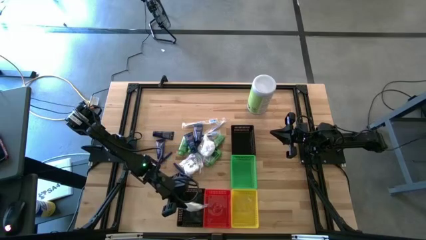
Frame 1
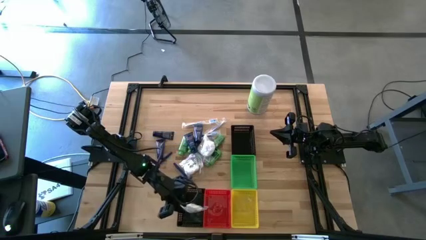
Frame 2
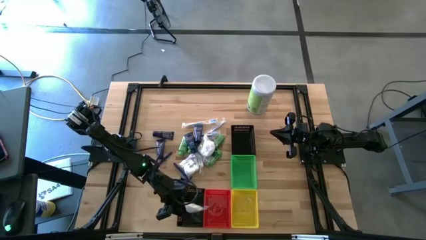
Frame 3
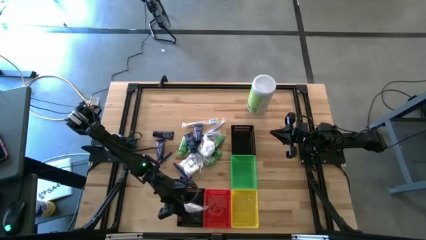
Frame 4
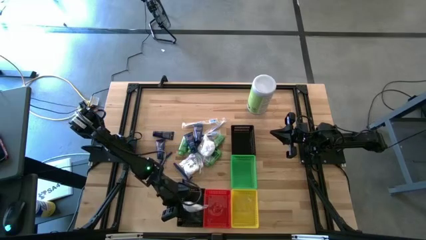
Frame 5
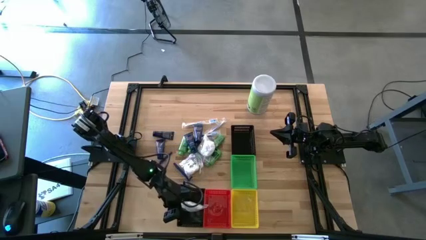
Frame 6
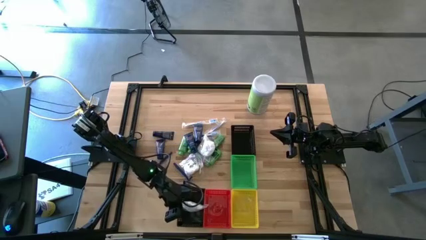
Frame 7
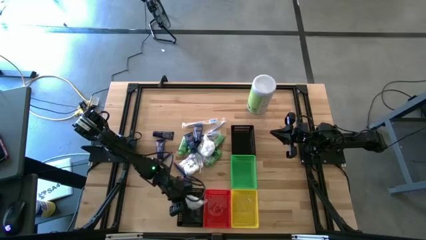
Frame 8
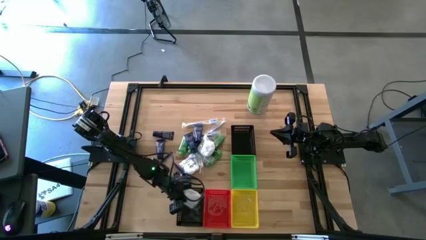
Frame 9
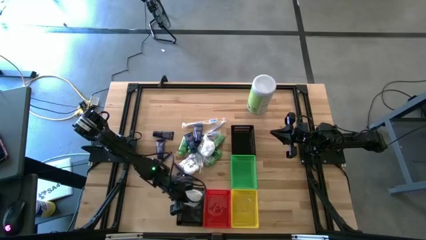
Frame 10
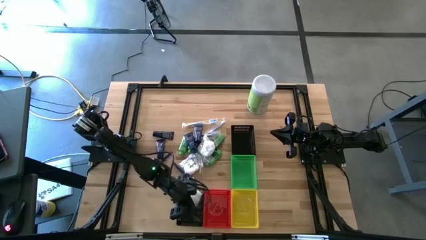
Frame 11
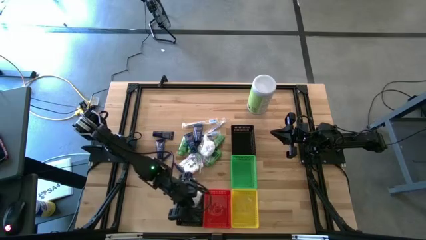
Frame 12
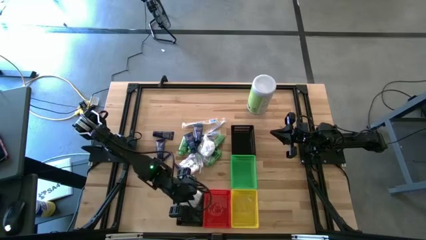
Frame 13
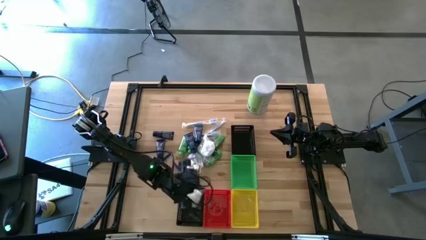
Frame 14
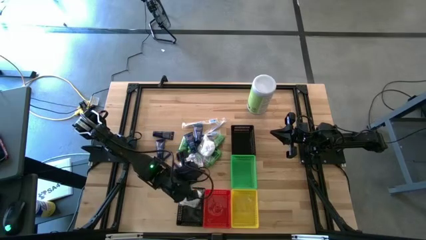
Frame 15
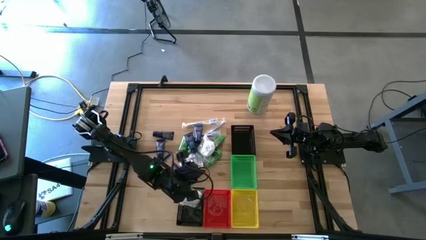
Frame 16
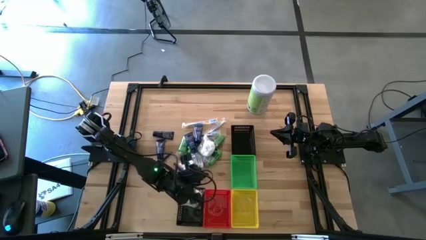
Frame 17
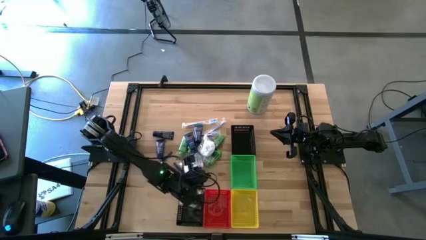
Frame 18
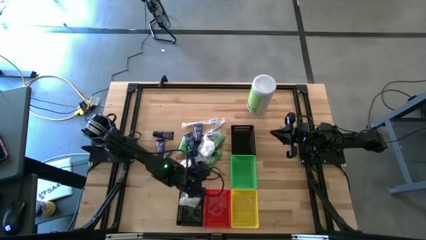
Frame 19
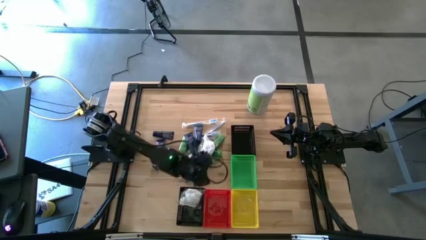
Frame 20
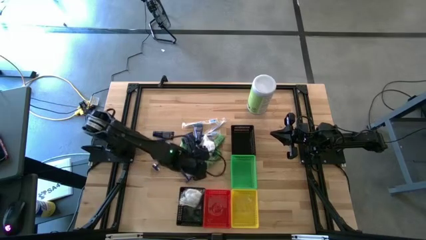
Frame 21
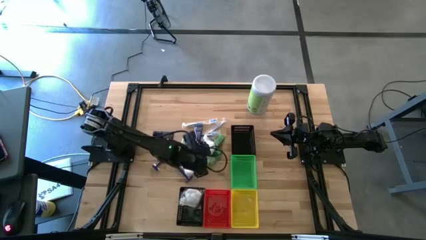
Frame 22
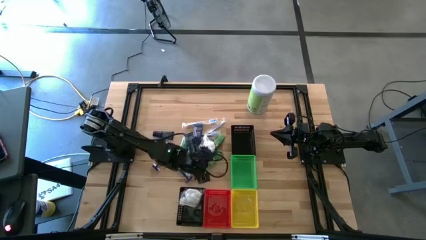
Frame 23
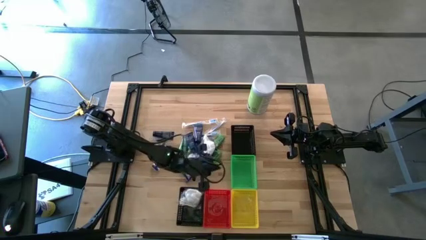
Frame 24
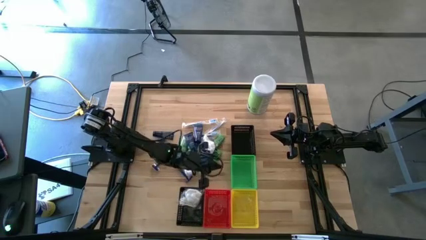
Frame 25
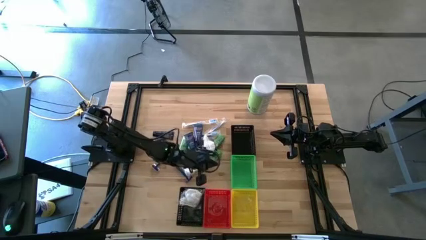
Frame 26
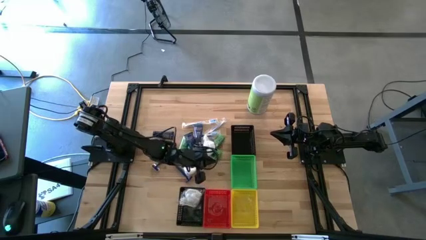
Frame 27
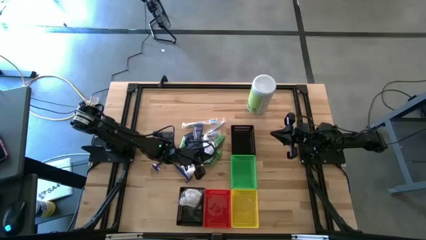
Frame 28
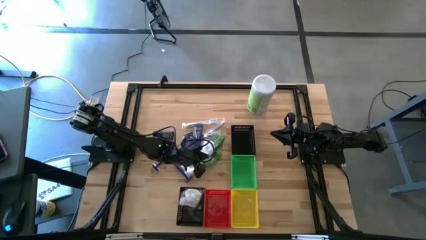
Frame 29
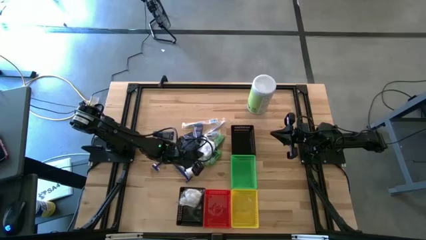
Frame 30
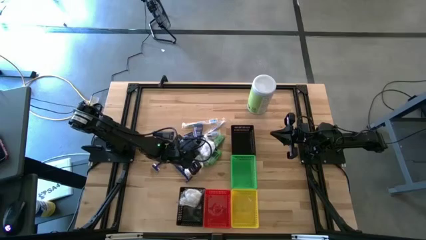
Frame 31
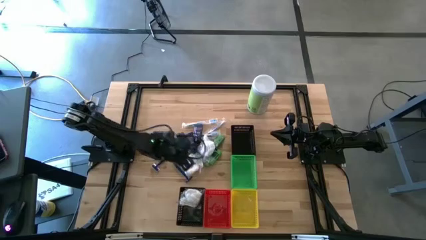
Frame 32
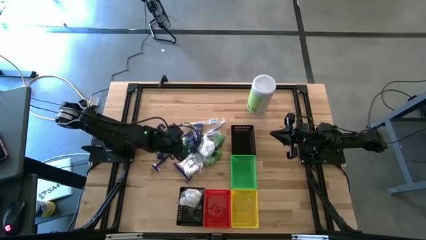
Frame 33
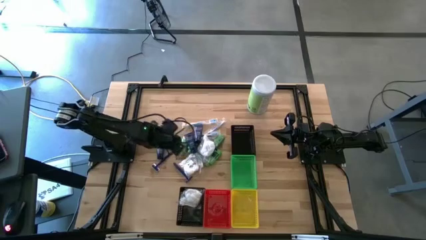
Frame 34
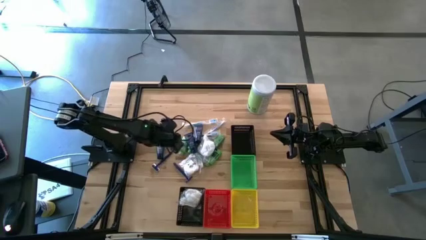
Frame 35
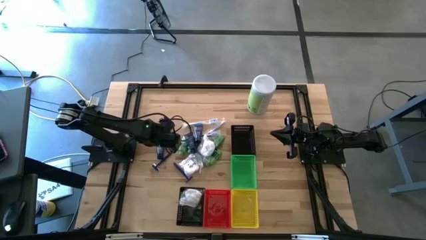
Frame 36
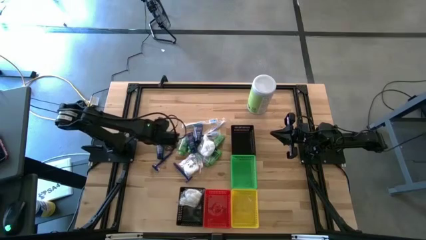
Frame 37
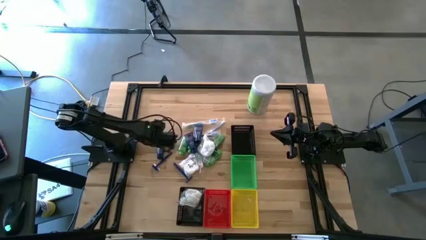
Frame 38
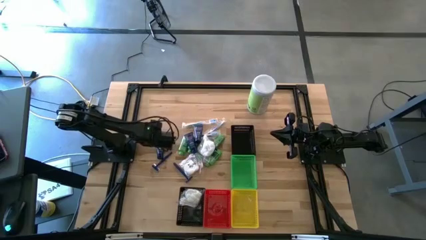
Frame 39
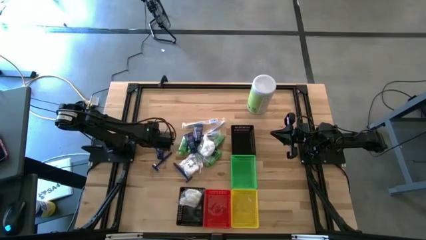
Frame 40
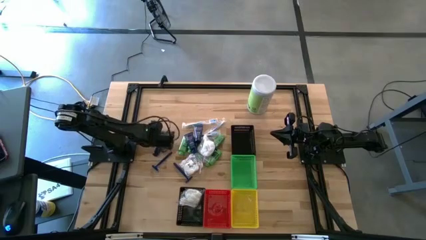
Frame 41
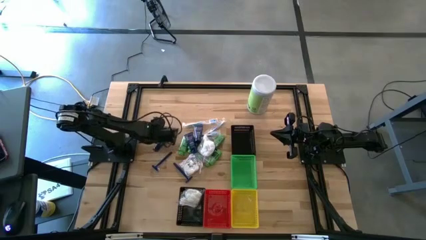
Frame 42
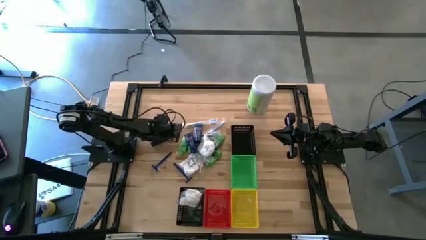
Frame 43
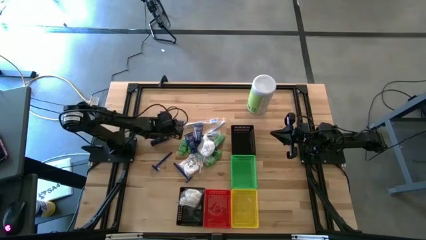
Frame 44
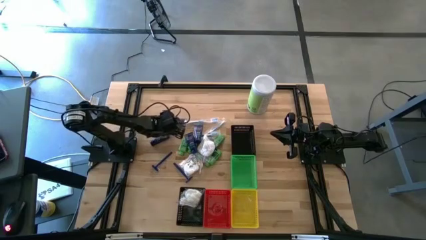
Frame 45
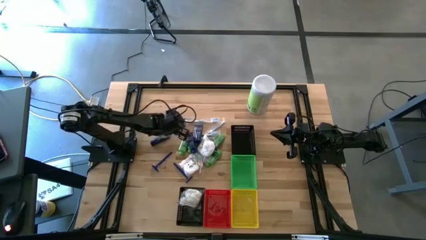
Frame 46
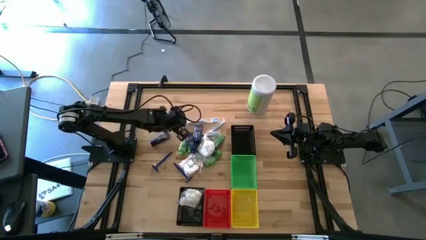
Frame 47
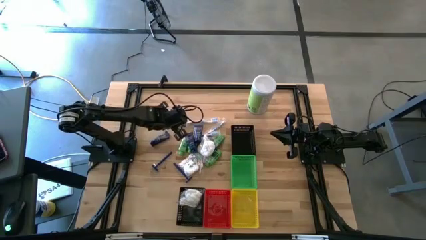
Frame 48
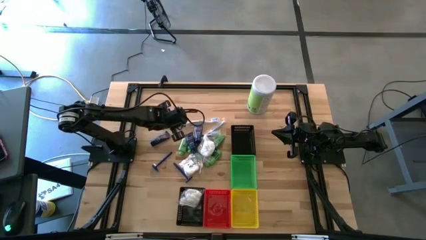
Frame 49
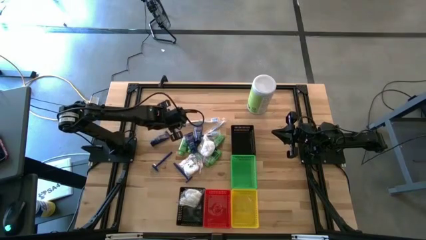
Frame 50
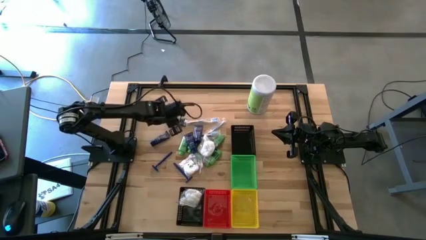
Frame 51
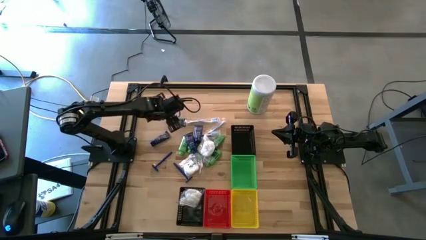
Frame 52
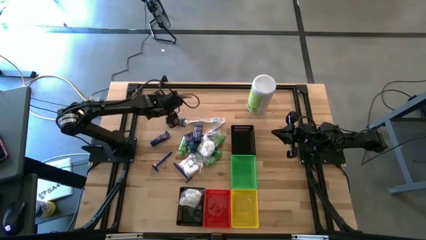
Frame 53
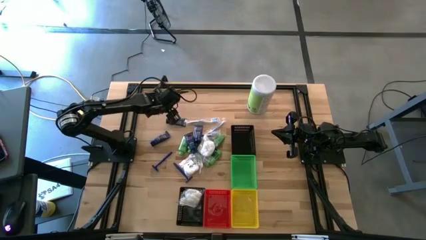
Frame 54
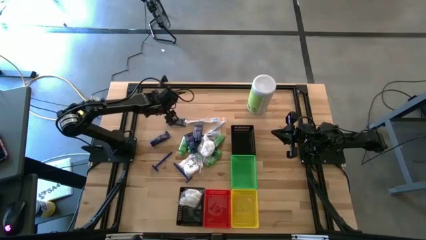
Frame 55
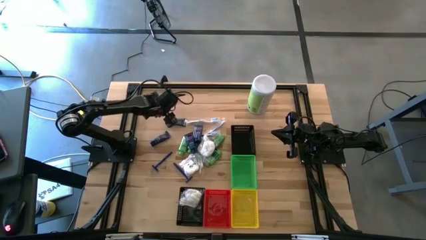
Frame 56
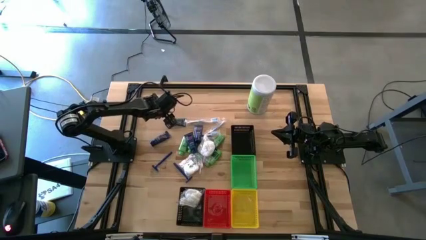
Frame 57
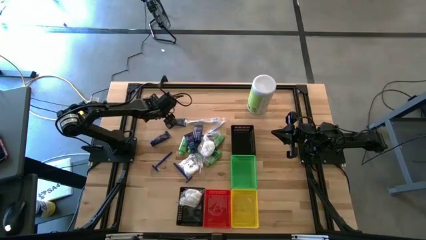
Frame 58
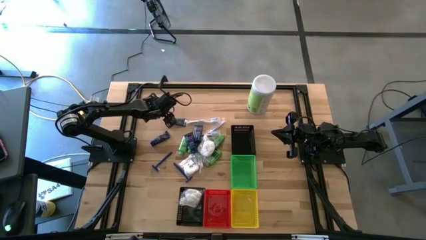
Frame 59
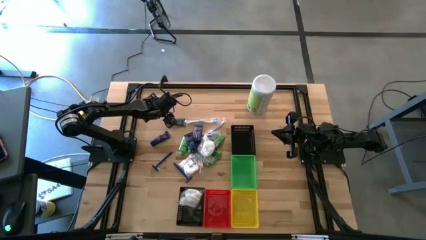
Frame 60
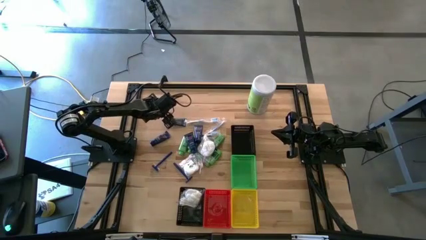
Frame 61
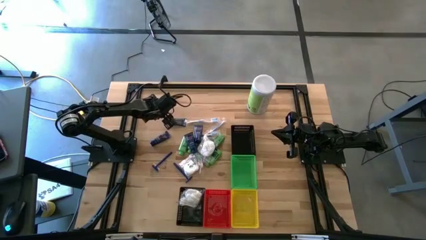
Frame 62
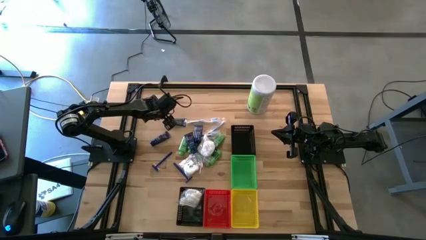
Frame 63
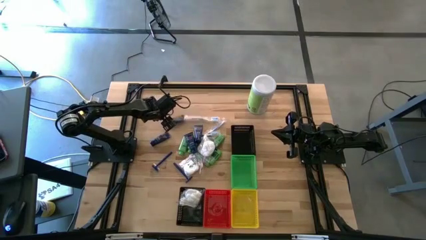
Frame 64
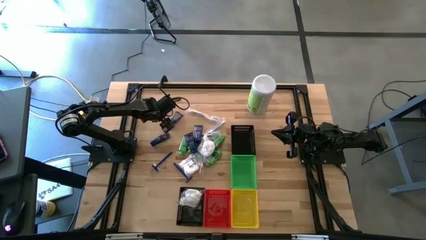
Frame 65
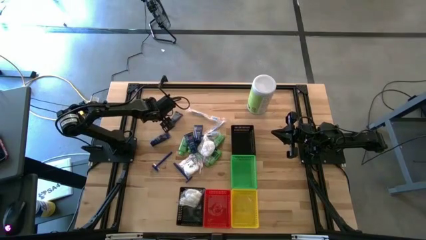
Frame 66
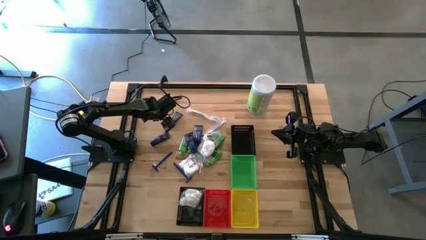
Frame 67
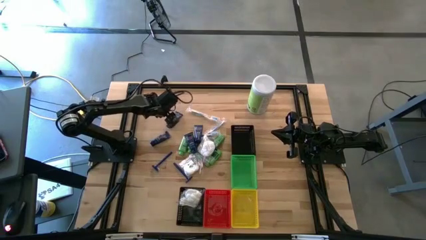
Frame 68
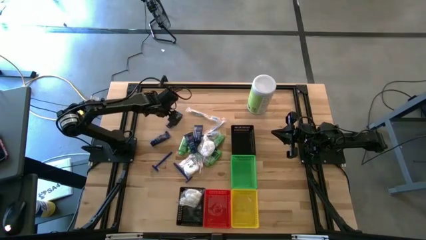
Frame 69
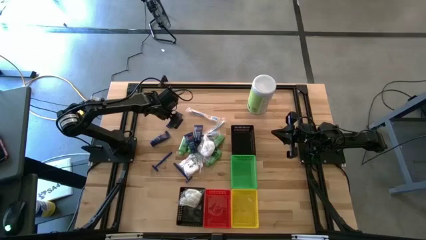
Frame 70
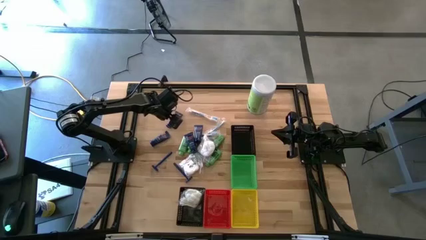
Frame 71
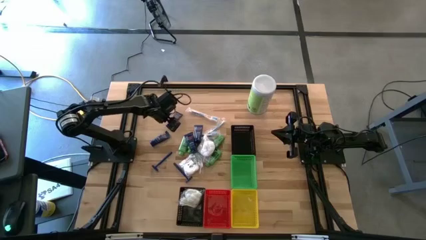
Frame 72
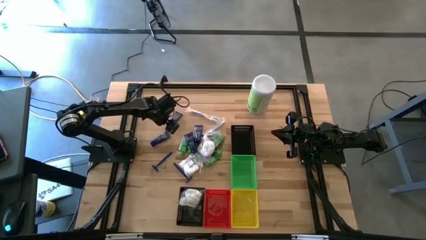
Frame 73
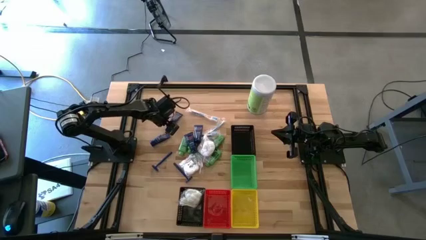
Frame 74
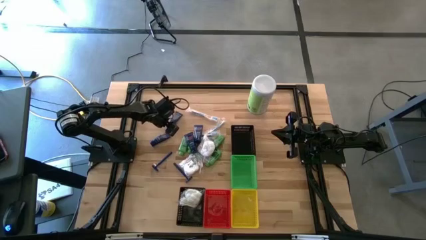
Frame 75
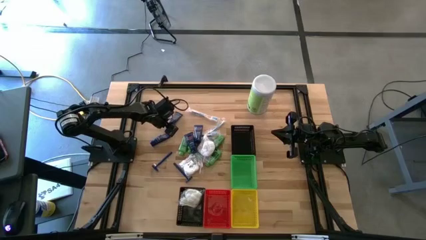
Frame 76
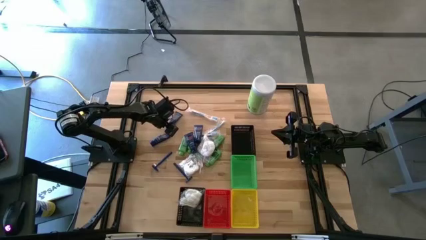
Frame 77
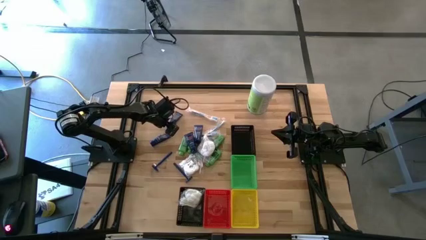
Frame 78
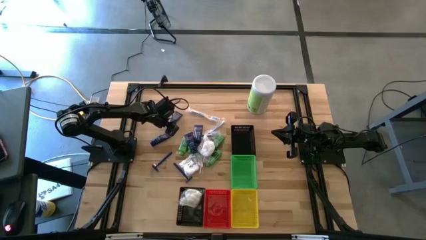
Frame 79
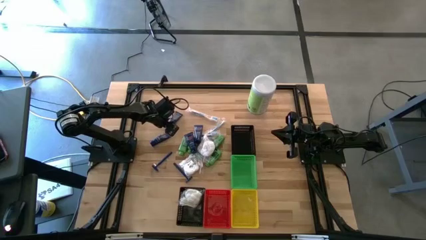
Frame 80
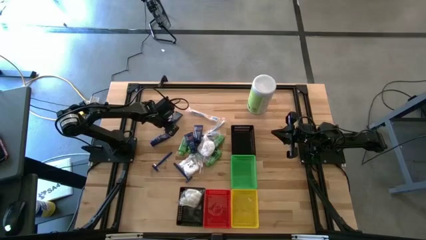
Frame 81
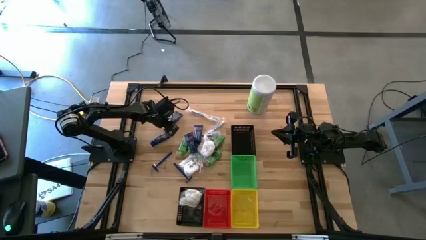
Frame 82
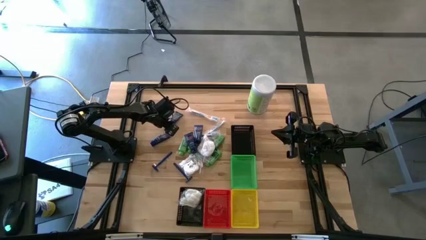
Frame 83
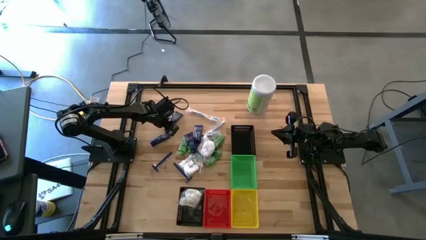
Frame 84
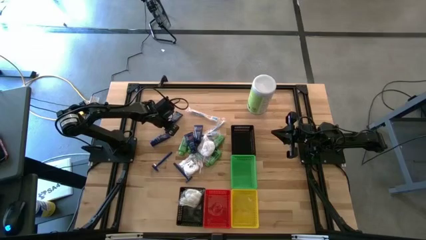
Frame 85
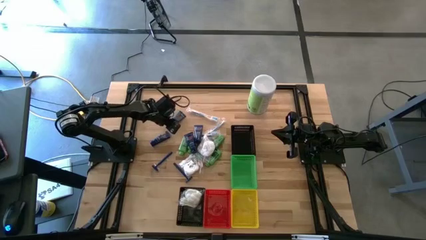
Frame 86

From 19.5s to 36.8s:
Task: Pick & Place Travel size toiletries
Put the blue shave cream into the red bin
